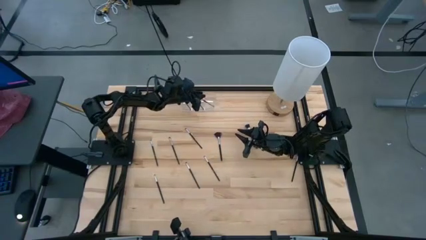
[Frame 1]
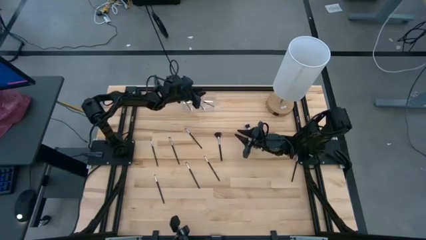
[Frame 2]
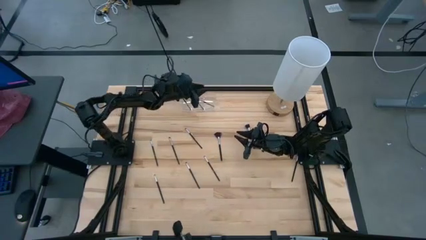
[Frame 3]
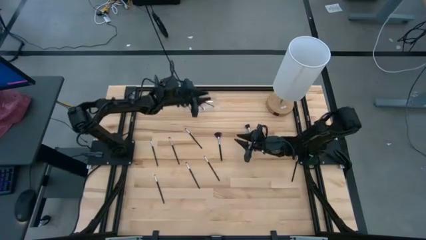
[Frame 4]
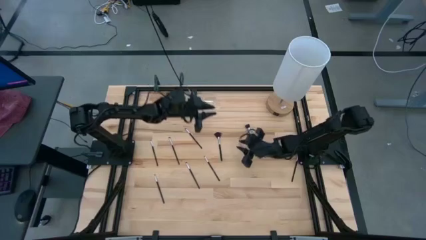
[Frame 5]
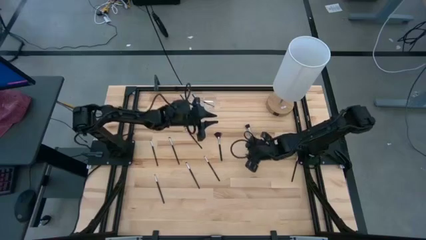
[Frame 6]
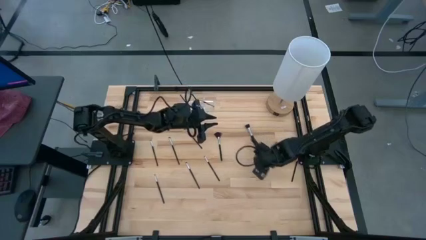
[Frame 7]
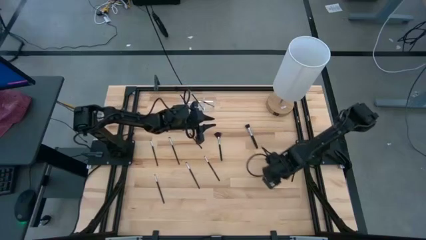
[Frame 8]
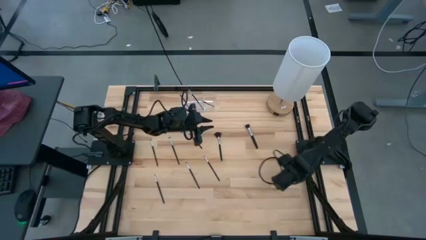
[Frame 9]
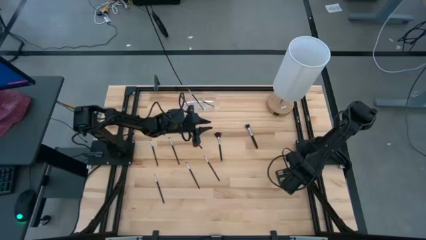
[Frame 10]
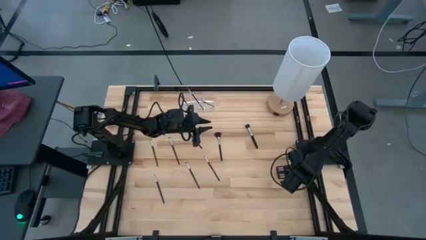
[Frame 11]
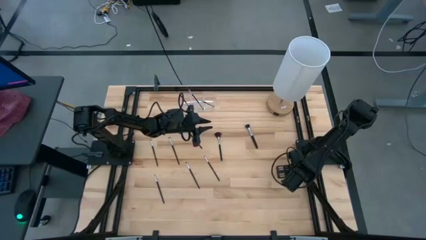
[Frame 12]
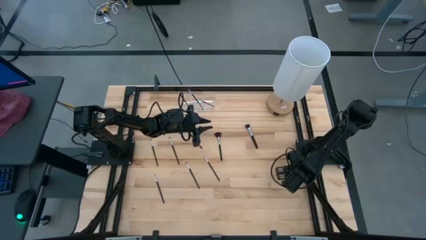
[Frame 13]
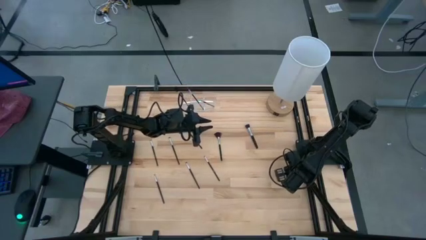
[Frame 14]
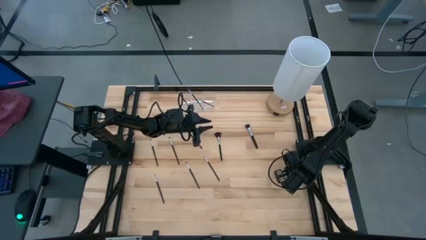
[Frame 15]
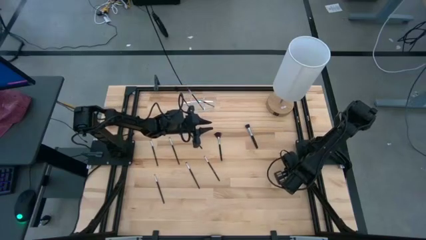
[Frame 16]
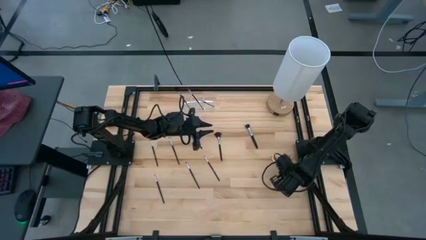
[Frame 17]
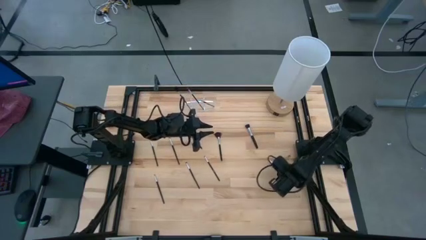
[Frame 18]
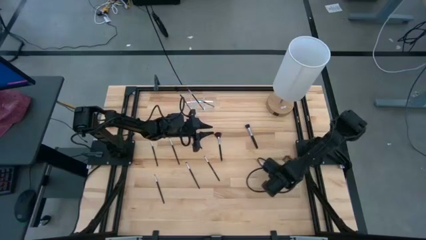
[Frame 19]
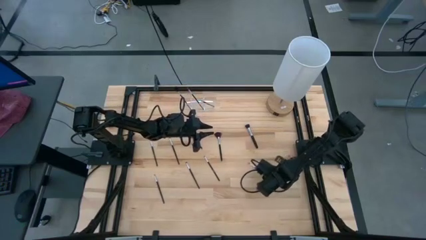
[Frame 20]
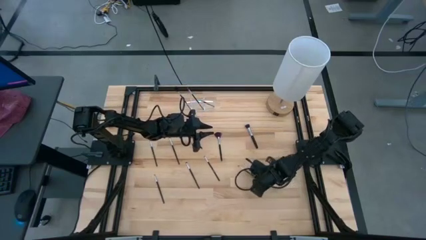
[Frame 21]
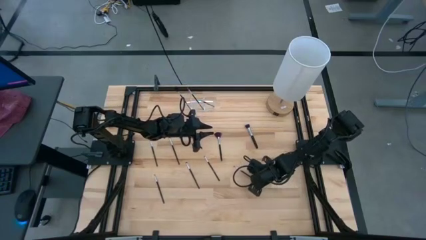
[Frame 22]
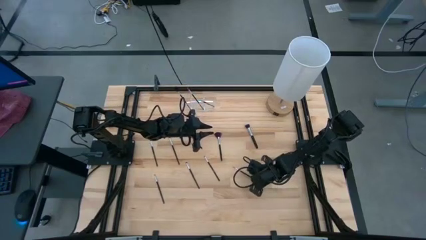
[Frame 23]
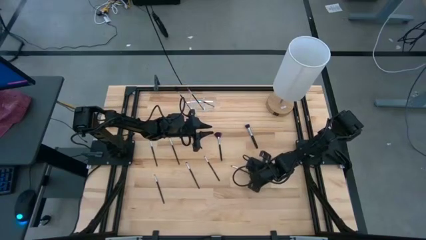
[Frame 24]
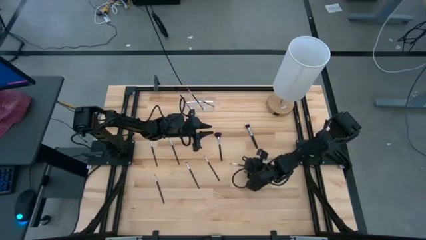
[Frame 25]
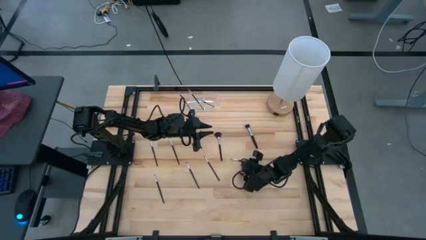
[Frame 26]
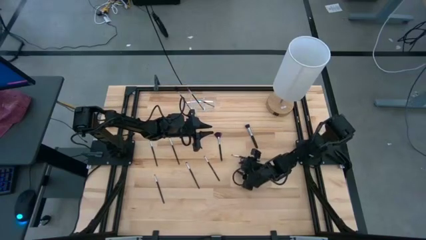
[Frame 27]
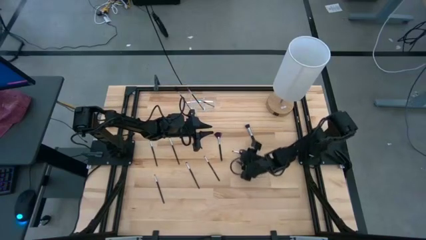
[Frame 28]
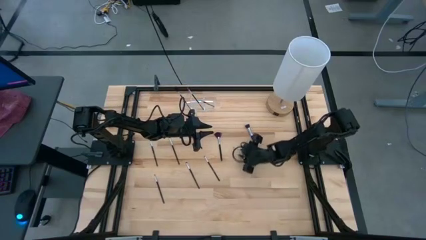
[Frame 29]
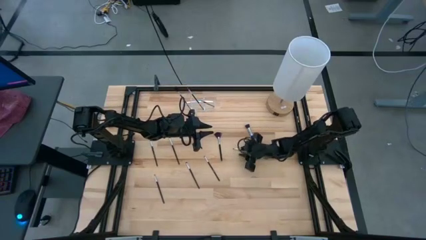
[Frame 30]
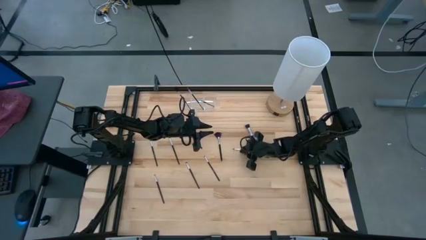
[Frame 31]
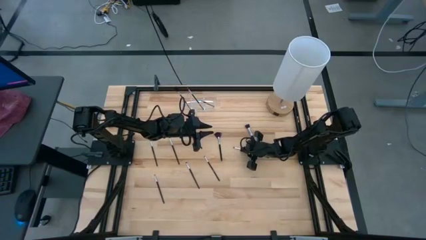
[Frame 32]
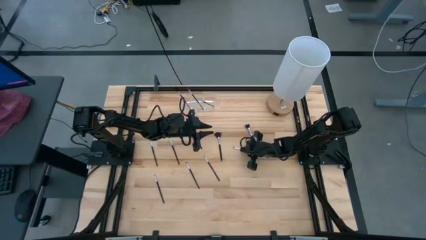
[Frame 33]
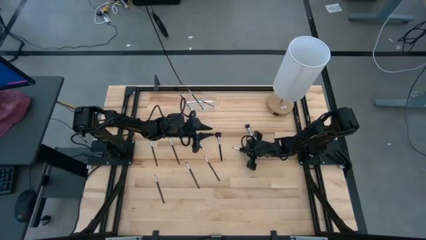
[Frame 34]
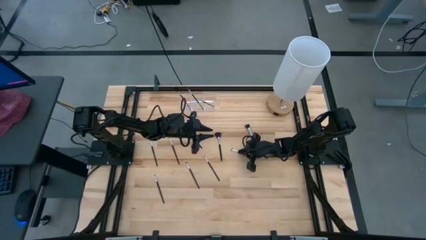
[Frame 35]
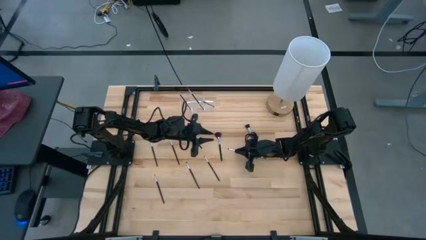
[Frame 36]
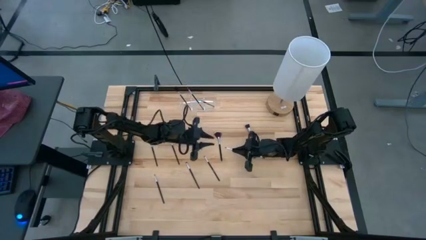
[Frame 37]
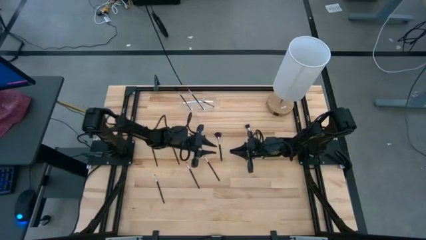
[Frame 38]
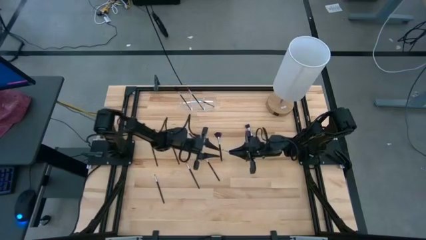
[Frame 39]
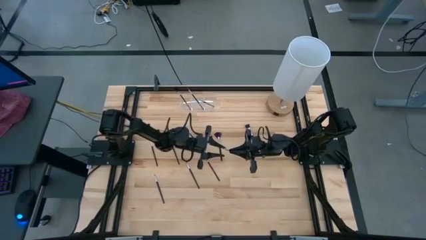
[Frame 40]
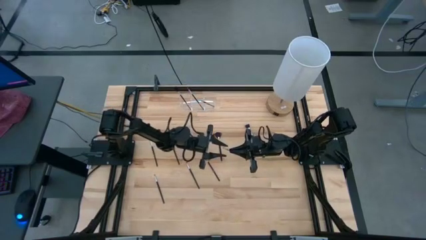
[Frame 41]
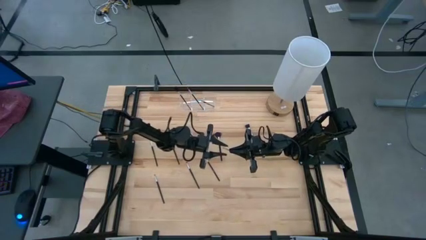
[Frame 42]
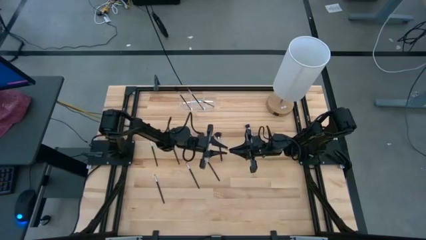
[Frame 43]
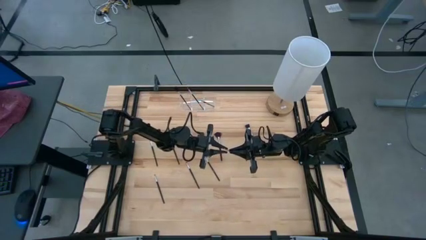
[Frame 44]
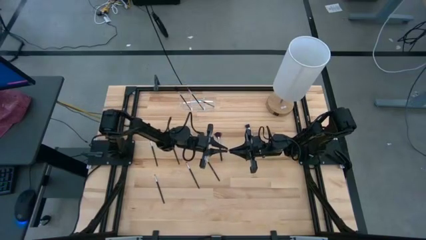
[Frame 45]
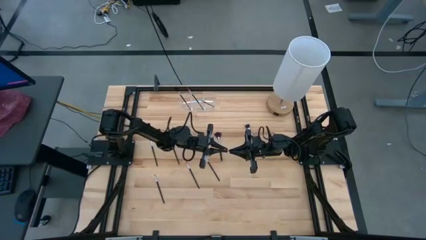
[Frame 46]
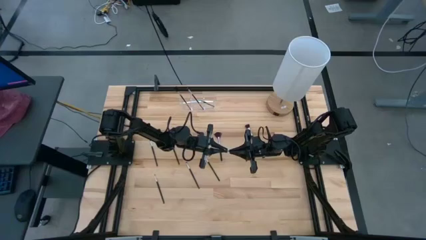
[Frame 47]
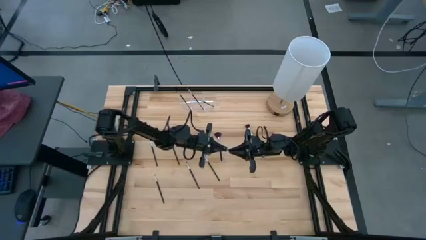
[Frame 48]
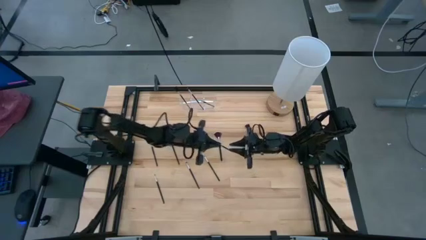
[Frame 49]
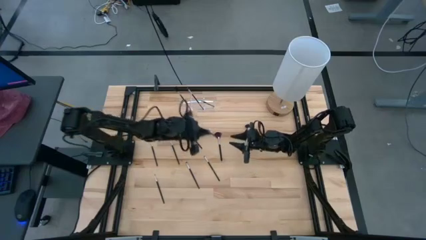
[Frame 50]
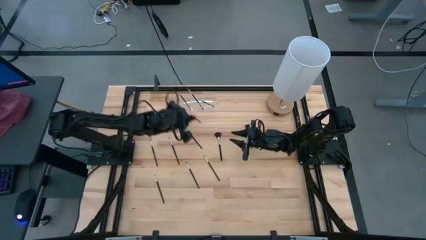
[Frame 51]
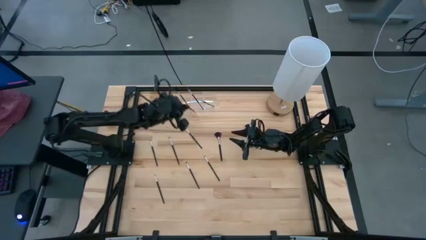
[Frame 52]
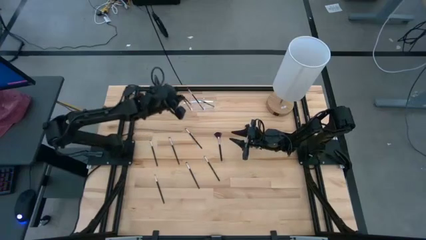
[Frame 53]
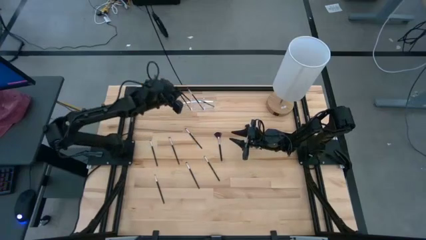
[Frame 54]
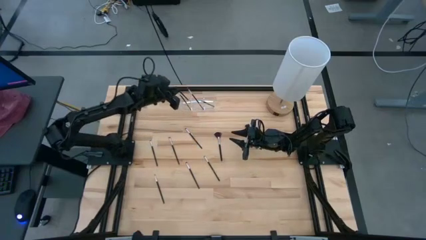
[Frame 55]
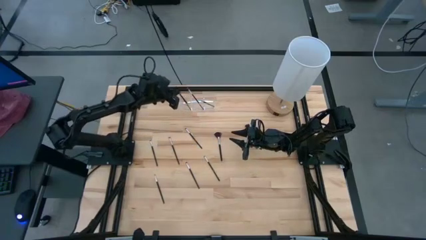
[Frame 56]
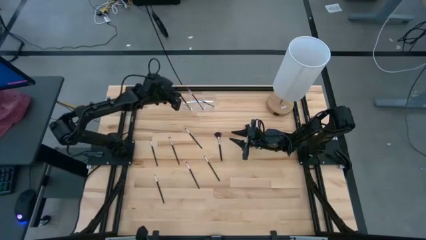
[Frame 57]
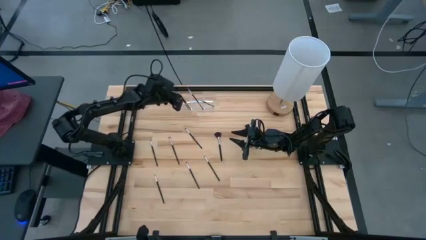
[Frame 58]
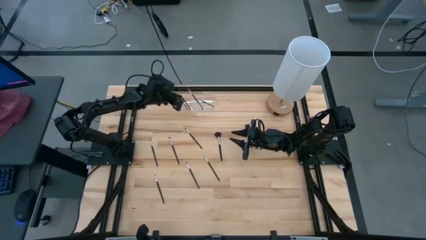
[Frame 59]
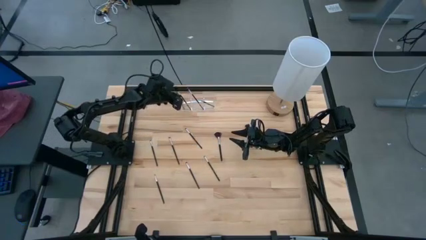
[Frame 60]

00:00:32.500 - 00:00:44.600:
Task: Put items in baskets/containers
Put the black eyeshadow brush into the transparent organizer

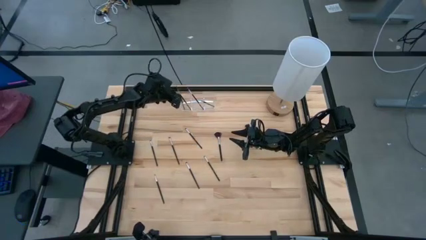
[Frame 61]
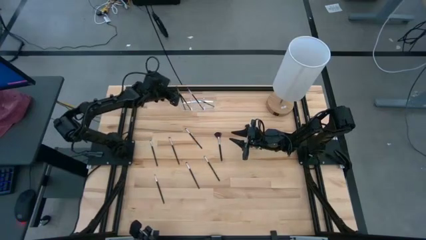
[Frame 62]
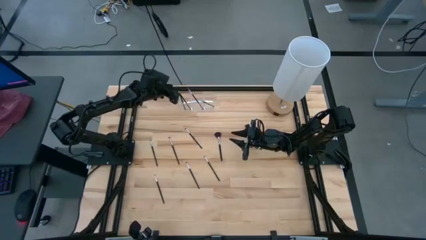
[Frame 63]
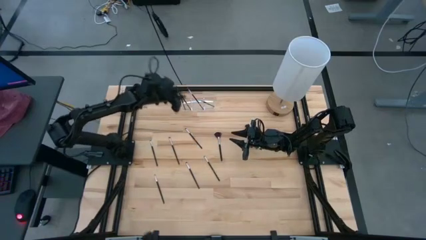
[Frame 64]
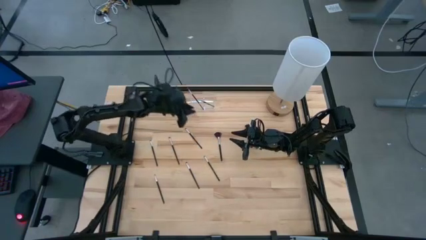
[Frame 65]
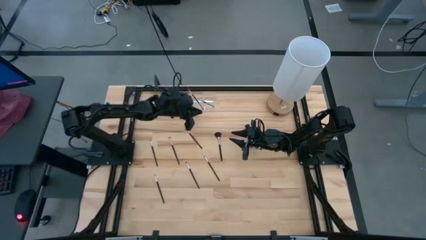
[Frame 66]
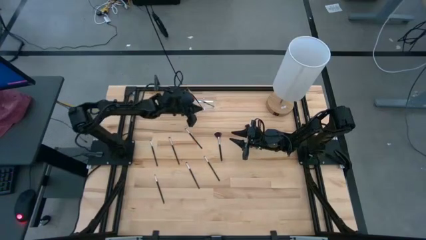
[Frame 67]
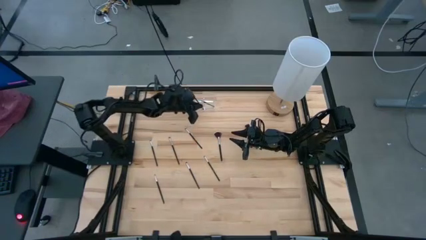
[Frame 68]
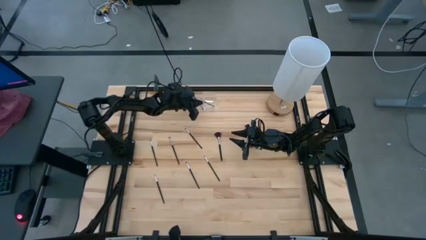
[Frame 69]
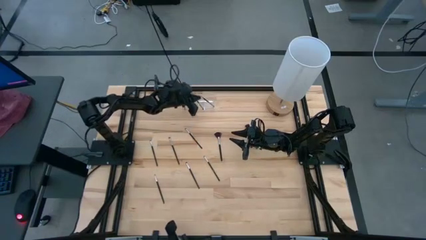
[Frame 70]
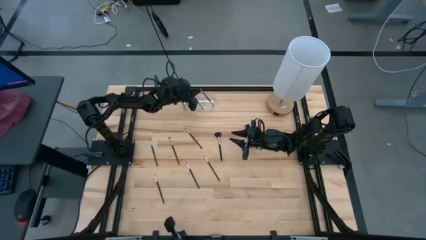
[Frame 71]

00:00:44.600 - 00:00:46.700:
Adjust the black liner brush in the transparent organizer

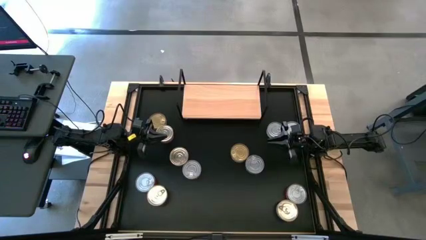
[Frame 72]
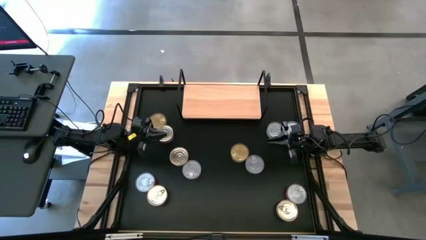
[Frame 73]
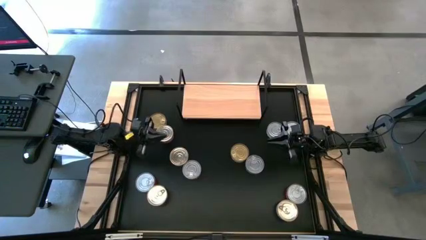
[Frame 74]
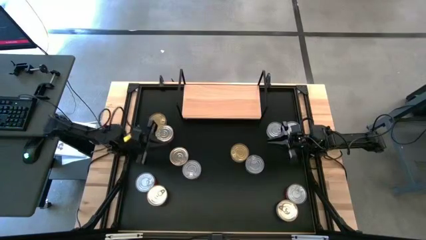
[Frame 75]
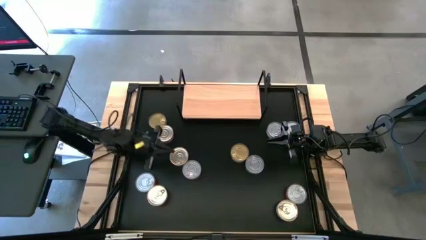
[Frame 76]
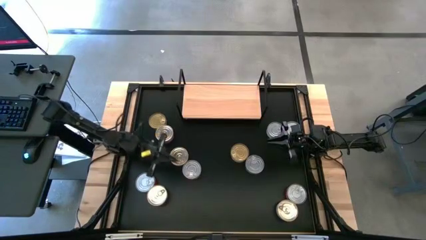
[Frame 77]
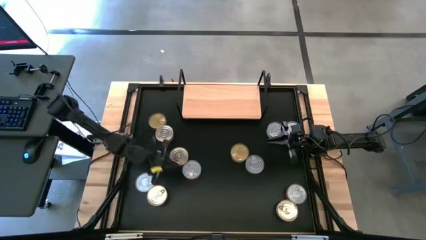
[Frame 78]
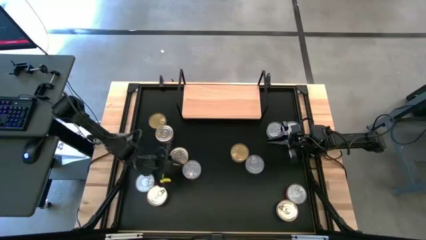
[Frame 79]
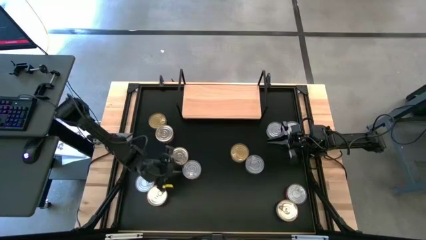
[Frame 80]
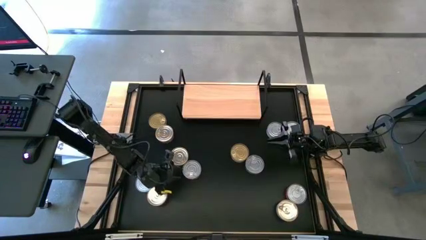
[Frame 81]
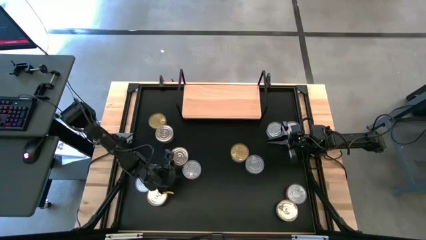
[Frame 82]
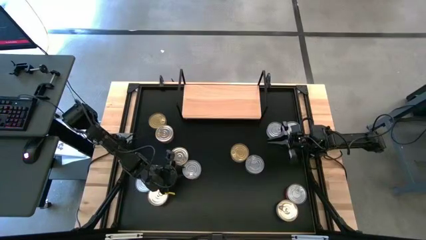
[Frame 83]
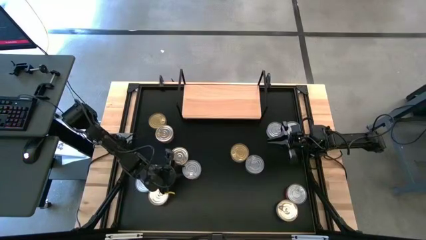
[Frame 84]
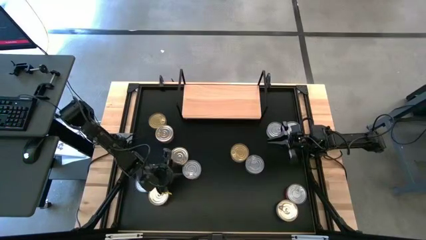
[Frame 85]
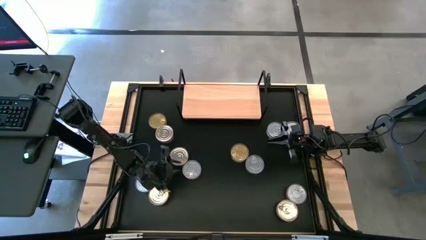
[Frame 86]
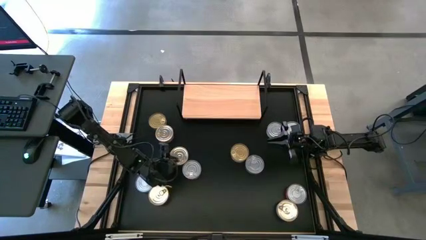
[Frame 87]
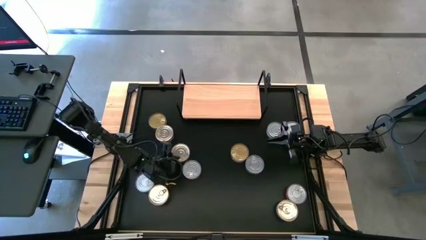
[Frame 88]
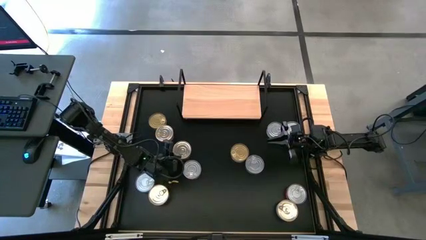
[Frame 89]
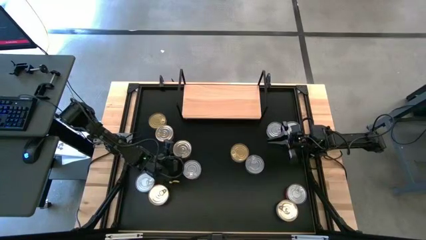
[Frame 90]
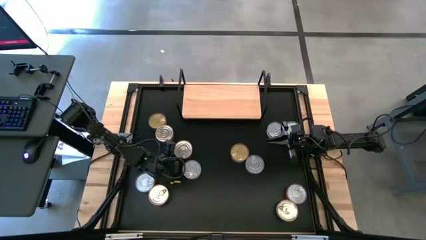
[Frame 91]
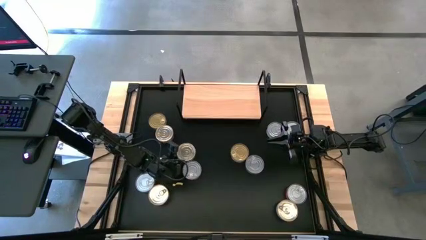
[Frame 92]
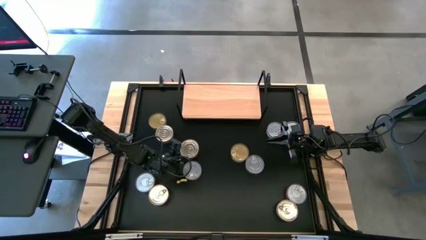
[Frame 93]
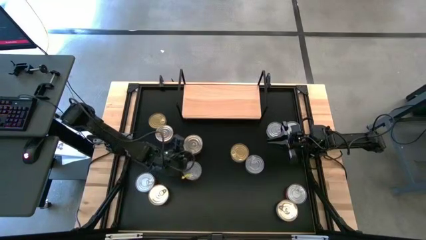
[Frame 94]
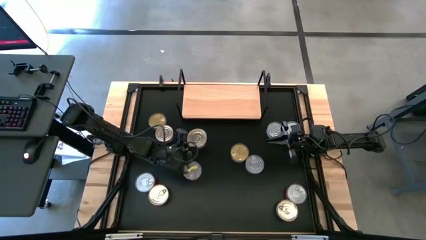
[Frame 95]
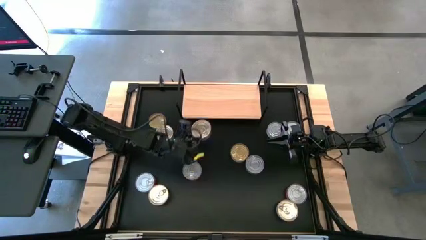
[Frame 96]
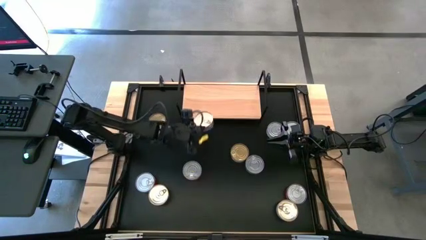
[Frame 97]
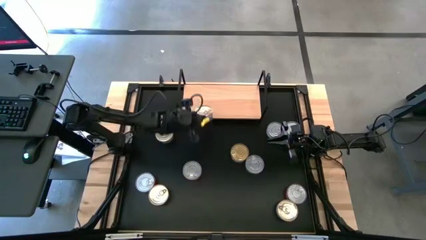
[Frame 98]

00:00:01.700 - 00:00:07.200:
Task: Stack canned seafood by type on shelf
Put the center blue canned tuna on the shelf
